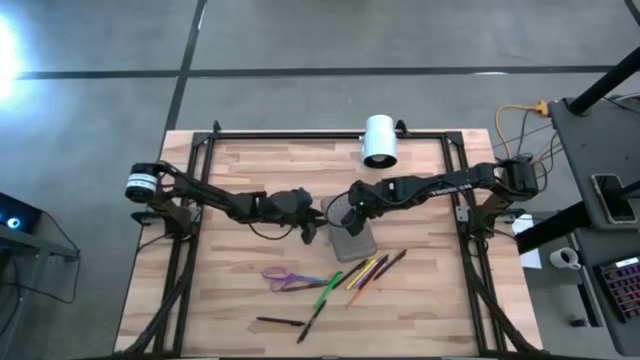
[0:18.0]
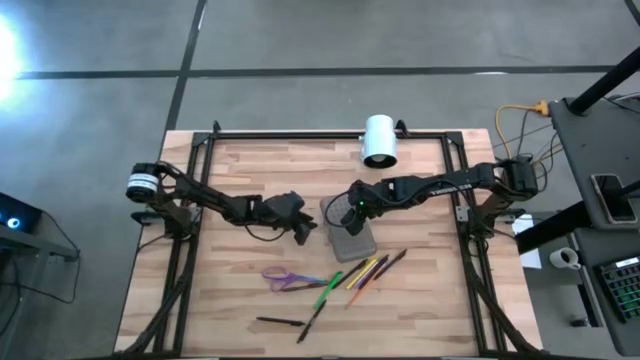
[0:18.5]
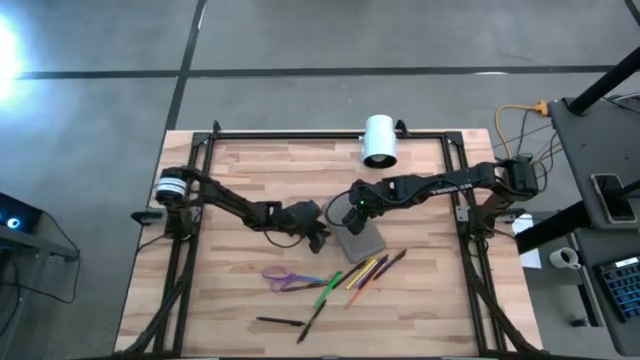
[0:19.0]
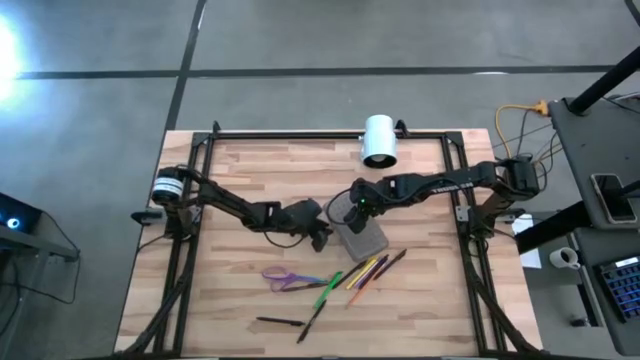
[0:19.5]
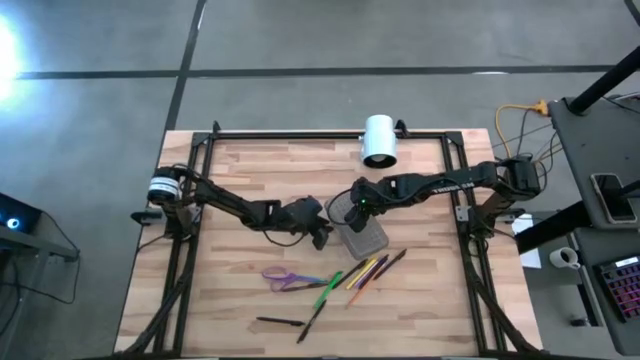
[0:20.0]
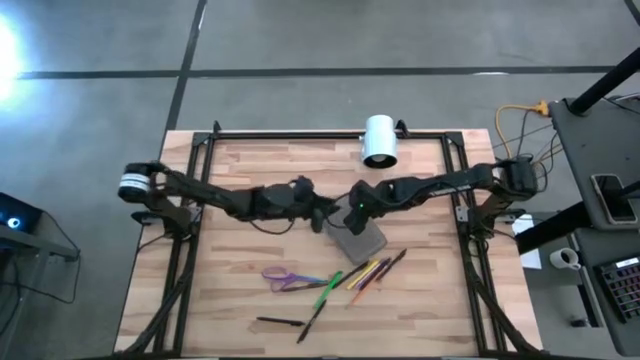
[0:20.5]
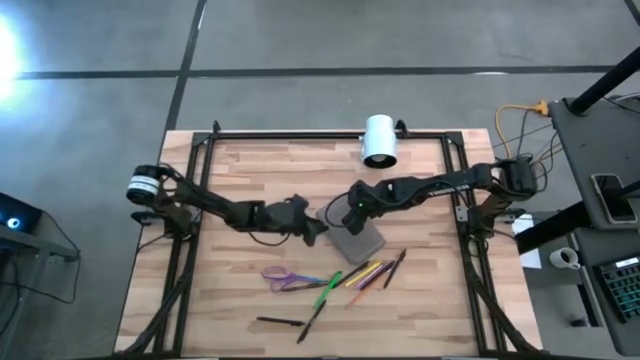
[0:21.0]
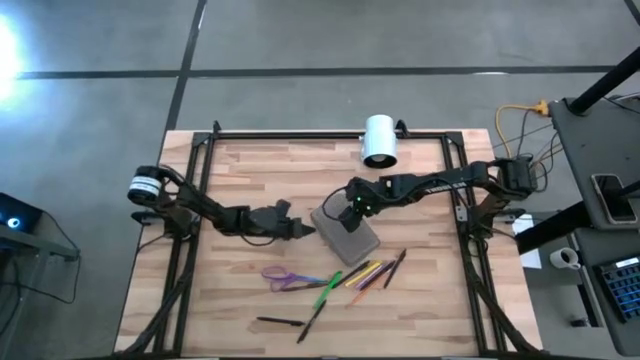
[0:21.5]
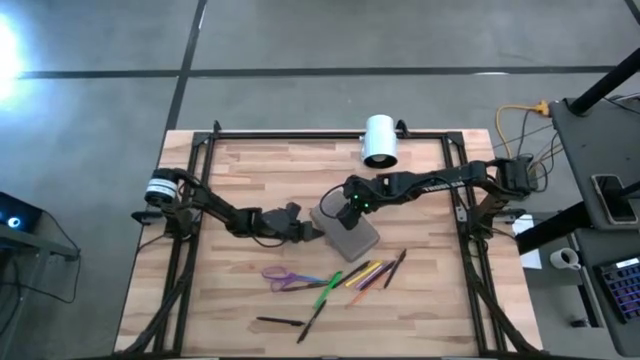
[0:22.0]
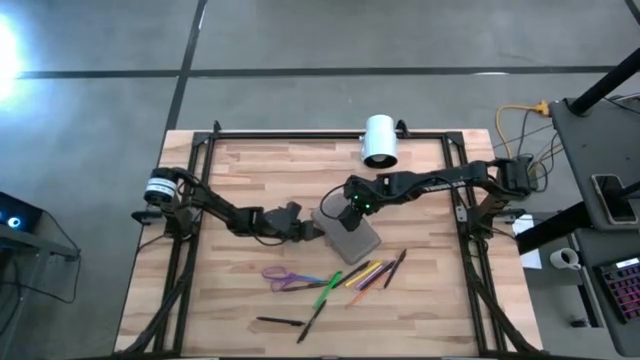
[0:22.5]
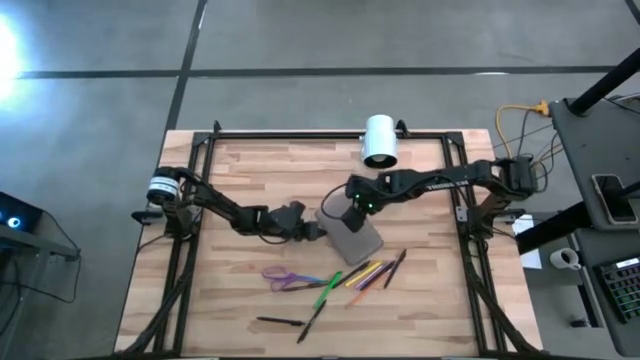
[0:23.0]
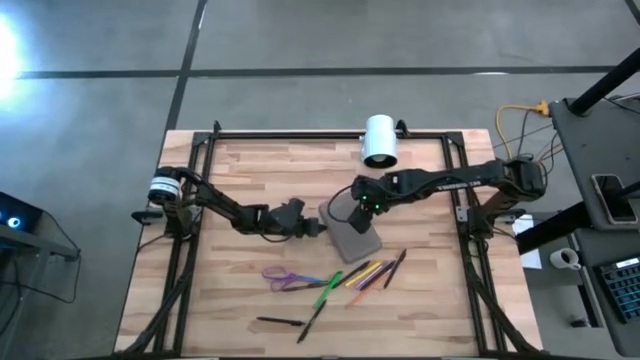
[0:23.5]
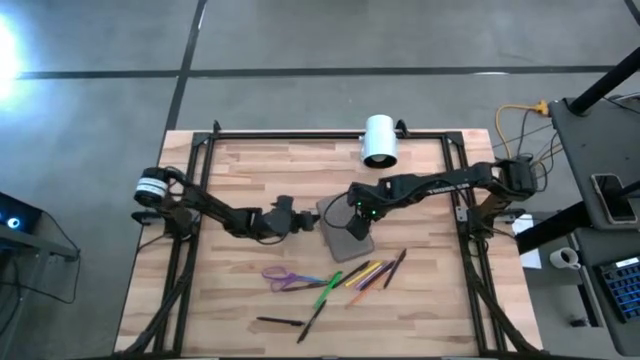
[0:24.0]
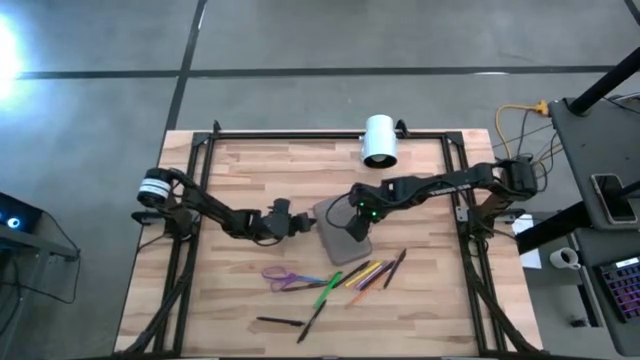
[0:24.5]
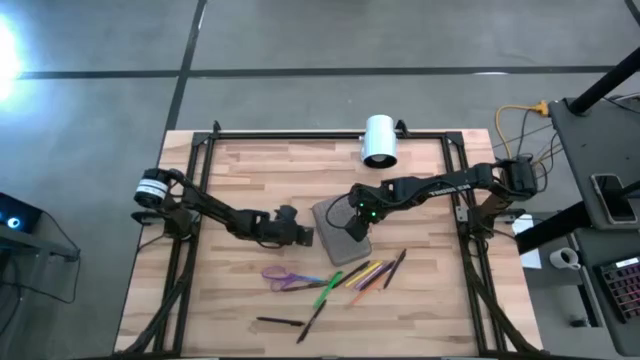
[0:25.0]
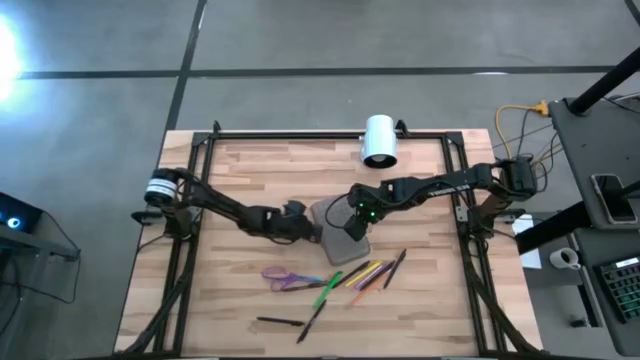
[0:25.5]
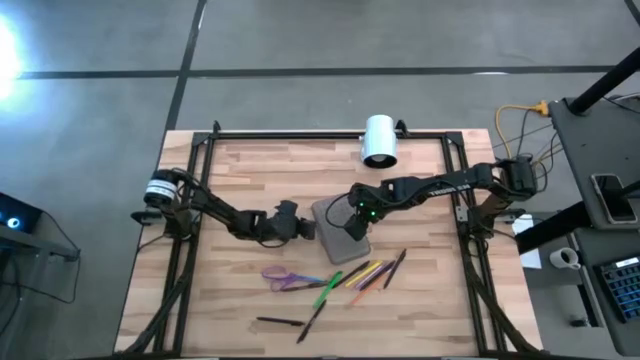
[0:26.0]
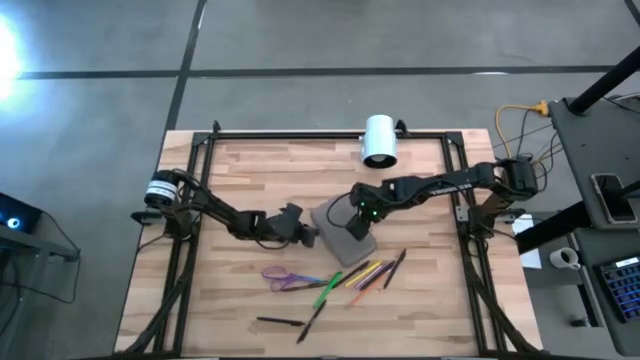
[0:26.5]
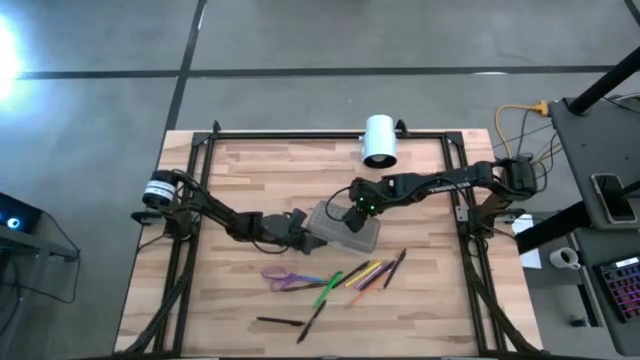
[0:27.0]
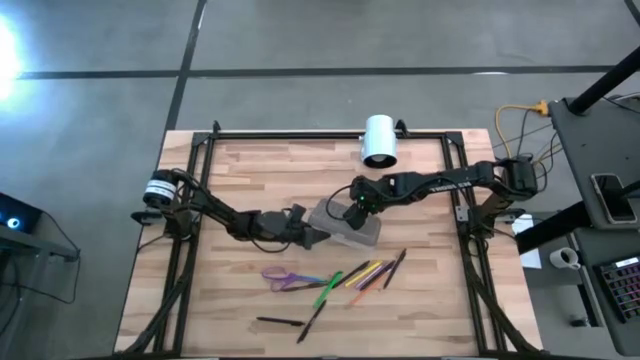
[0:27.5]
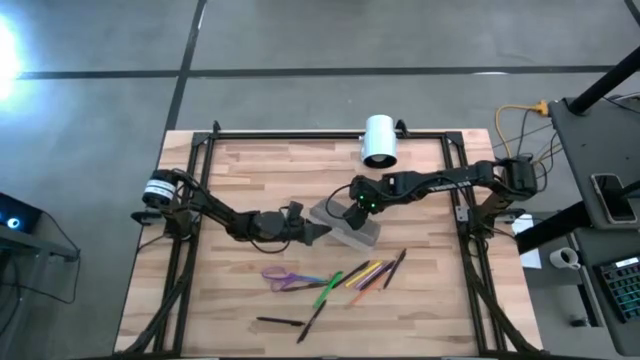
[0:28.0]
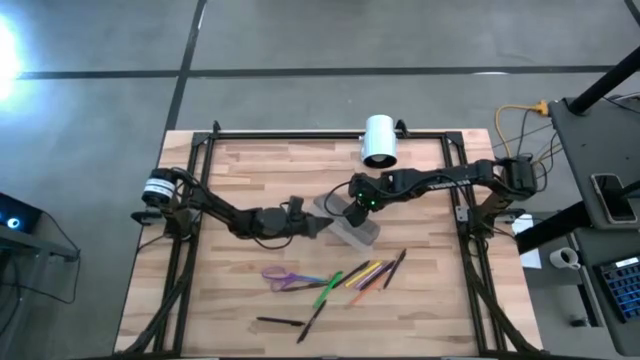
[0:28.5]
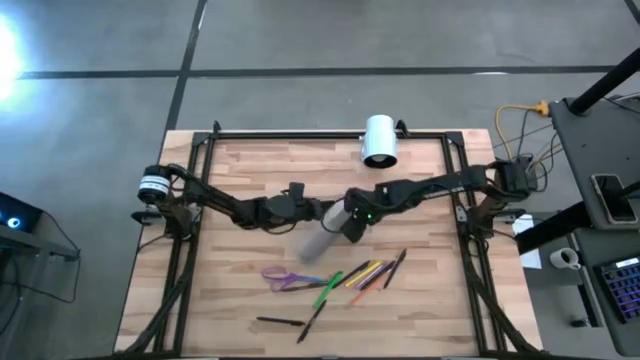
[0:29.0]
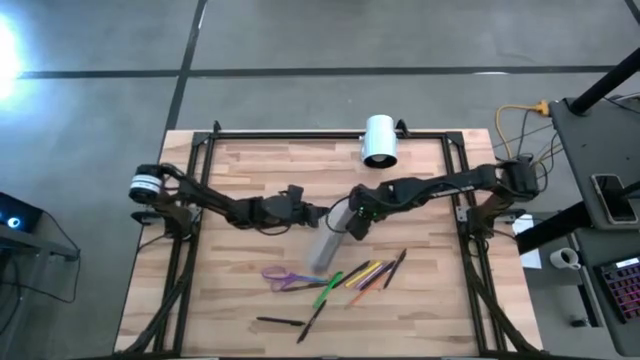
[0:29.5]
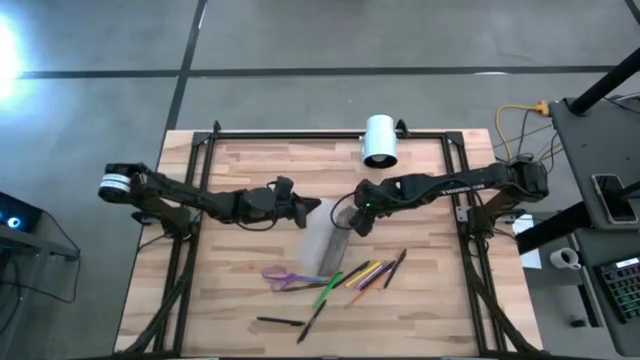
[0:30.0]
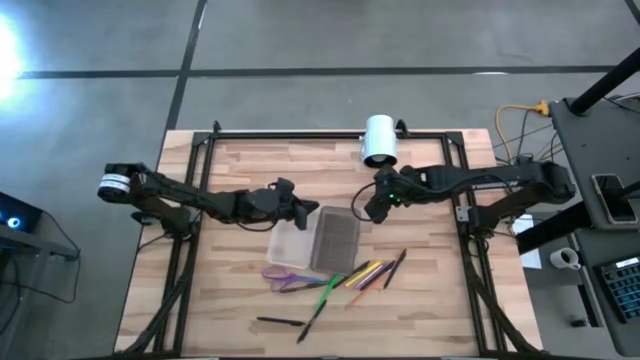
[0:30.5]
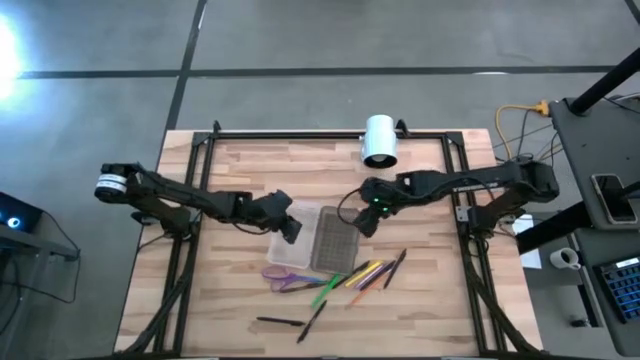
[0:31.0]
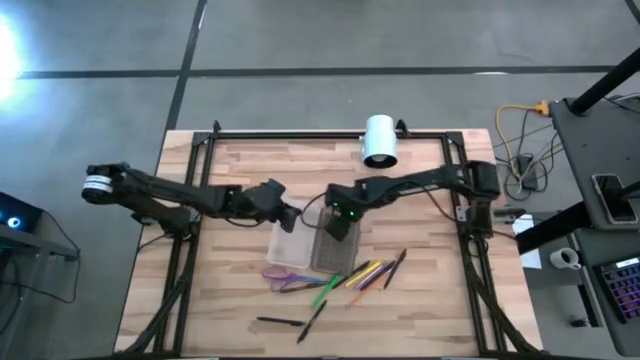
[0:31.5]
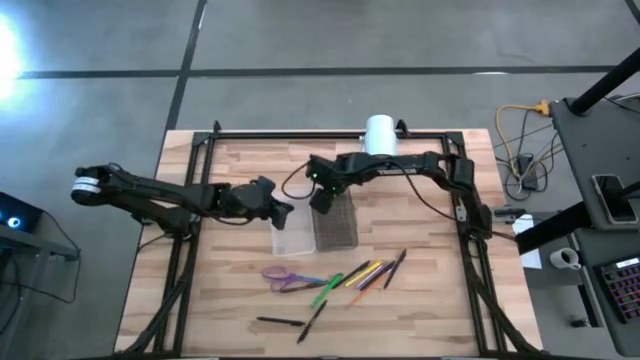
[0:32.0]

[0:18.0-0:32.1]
Task: Pick & place school supplies into a supply box
Open the black supply box

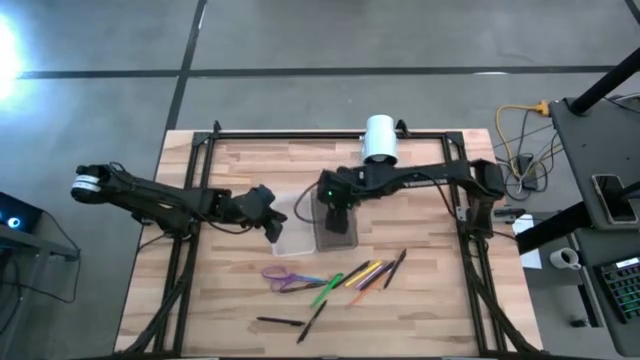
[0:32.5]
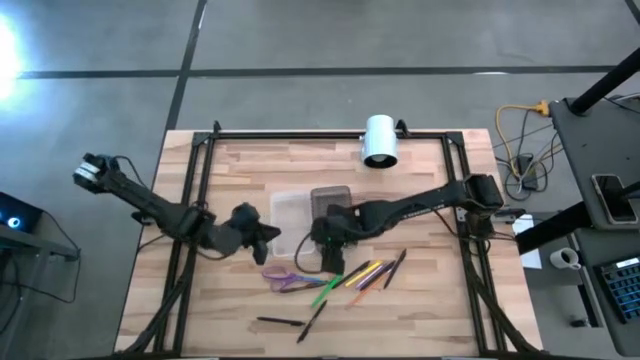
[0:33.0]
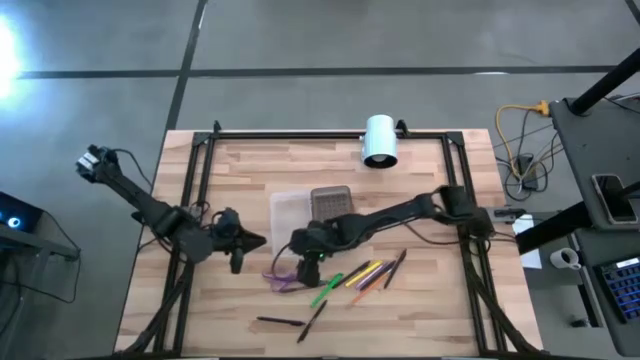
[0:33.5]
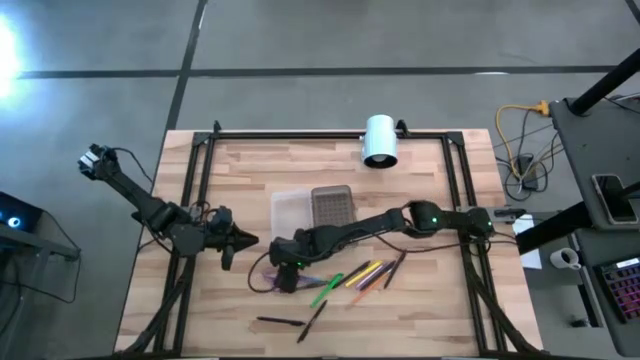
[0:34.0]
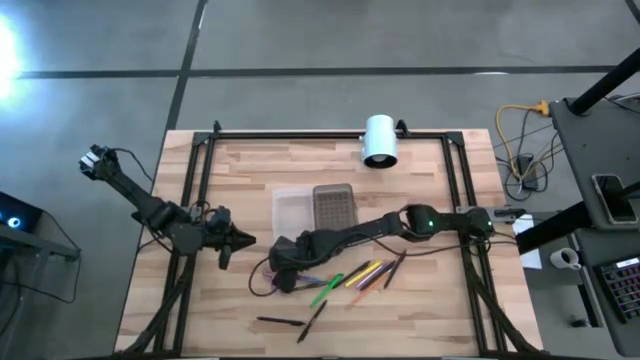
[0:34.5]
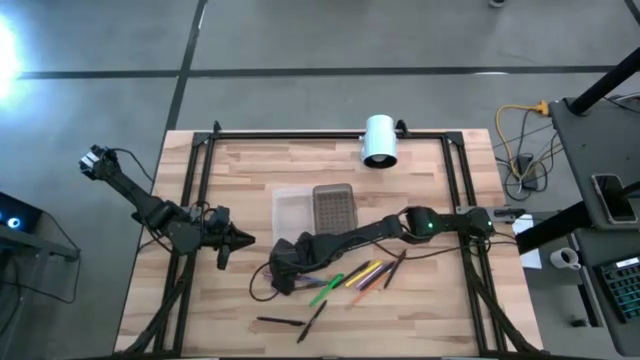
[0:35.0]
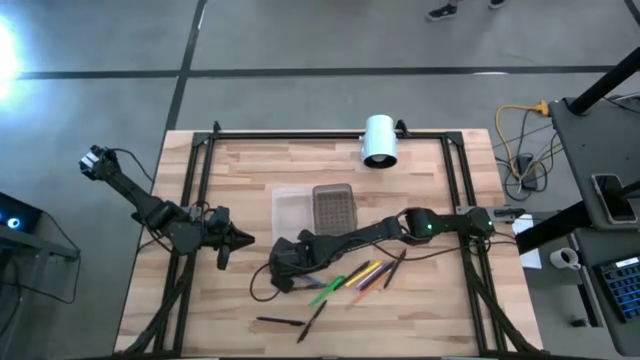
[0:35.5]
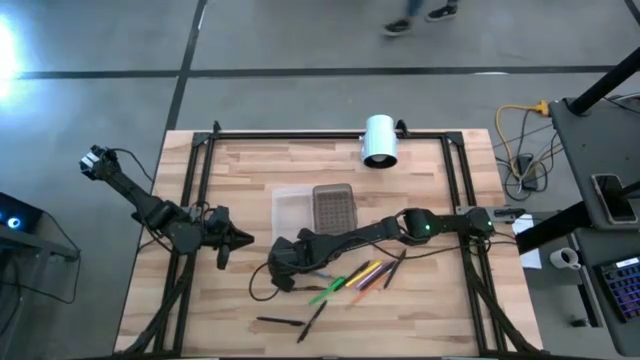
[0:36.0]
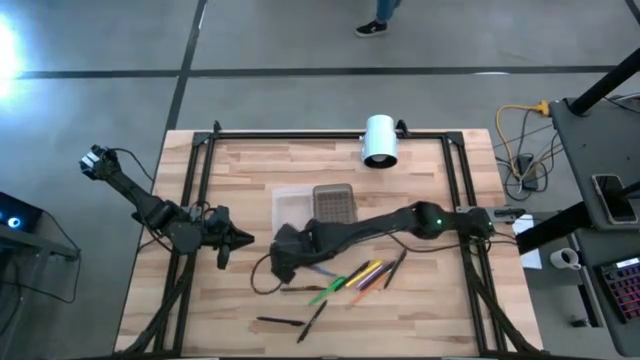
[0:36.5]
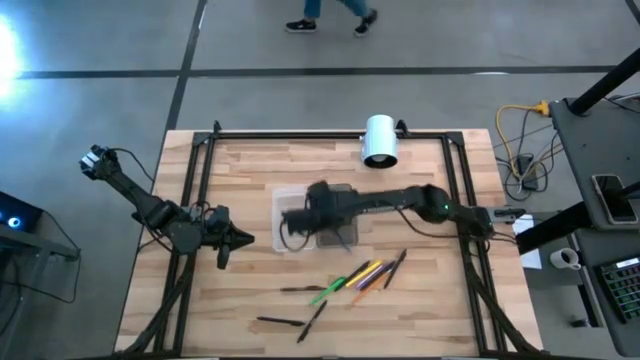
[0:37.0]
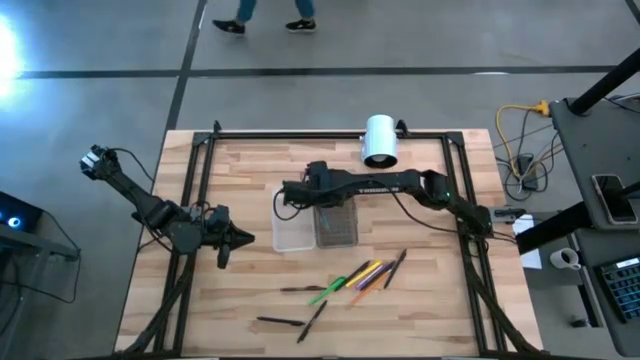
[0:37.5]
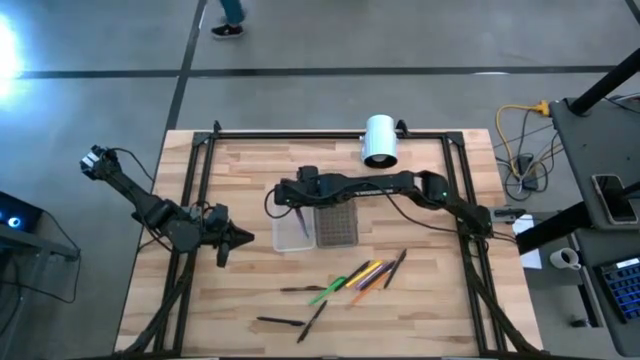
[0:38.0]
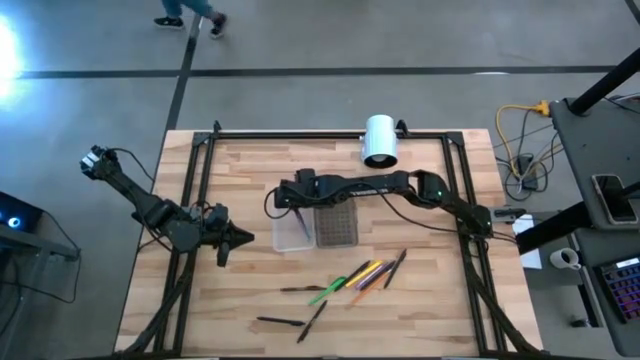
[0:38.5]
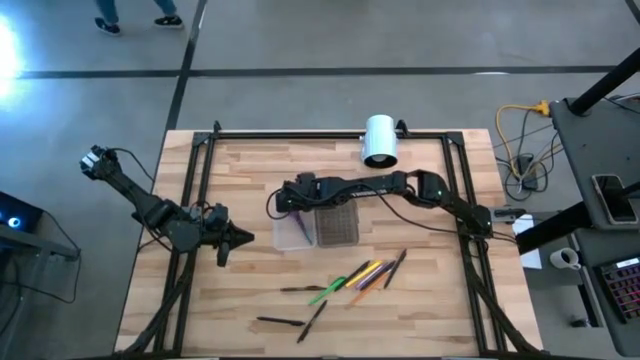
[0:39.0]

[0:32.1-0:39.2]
Put the purple scissors into the black supply box
